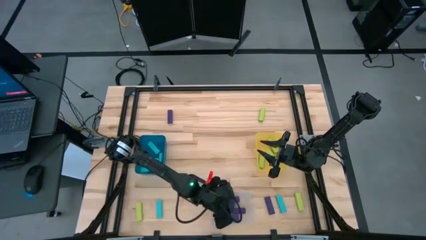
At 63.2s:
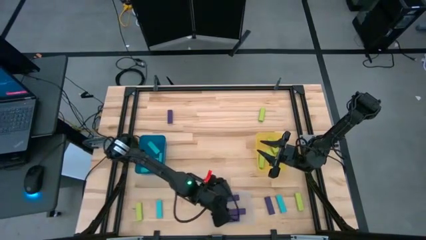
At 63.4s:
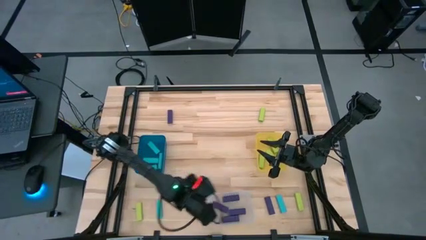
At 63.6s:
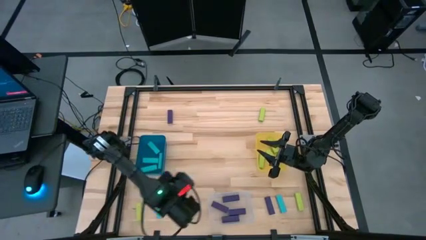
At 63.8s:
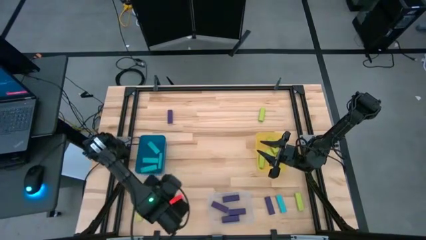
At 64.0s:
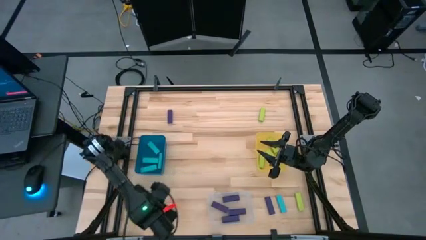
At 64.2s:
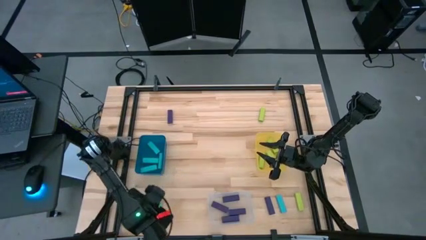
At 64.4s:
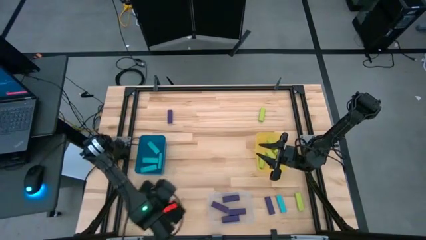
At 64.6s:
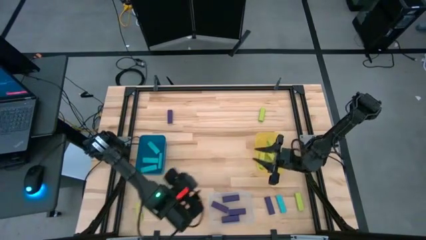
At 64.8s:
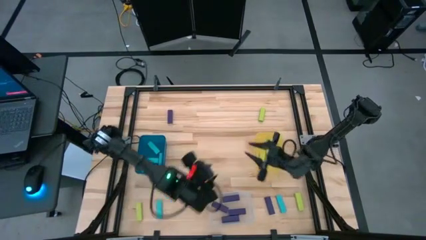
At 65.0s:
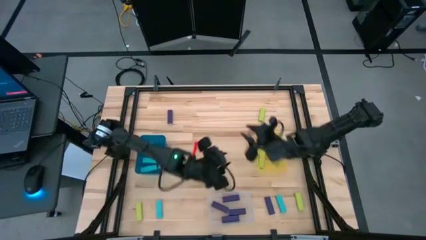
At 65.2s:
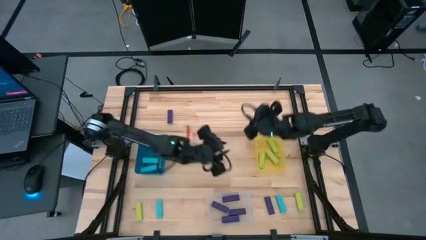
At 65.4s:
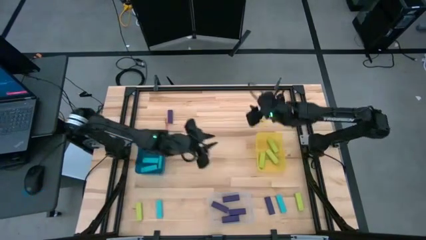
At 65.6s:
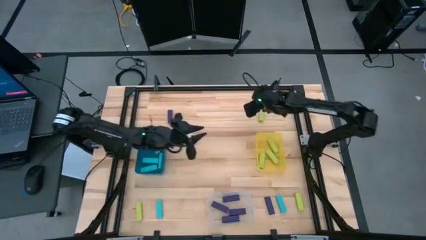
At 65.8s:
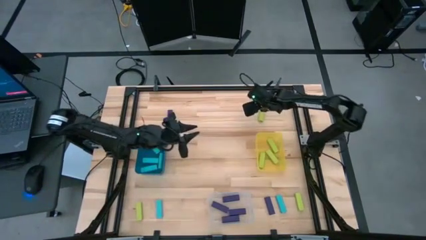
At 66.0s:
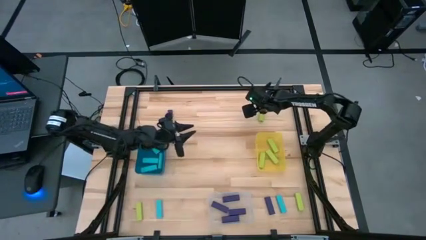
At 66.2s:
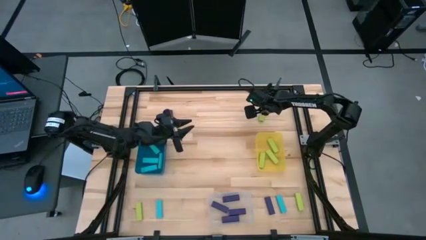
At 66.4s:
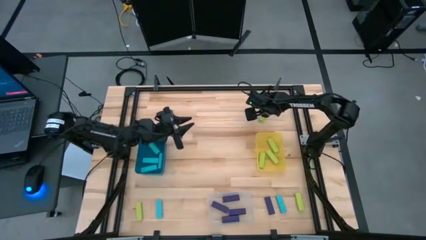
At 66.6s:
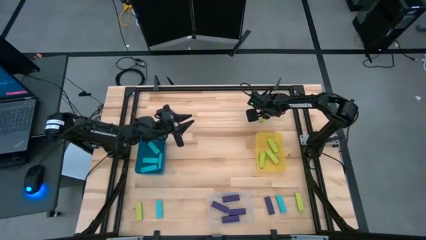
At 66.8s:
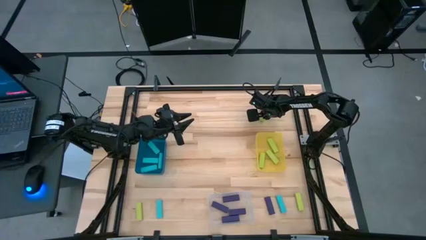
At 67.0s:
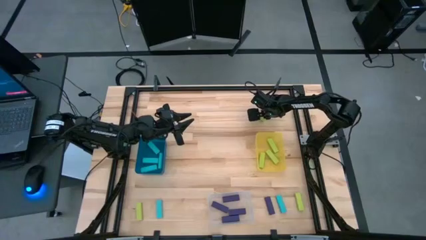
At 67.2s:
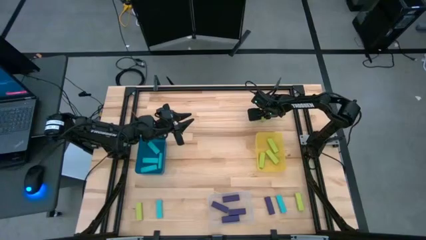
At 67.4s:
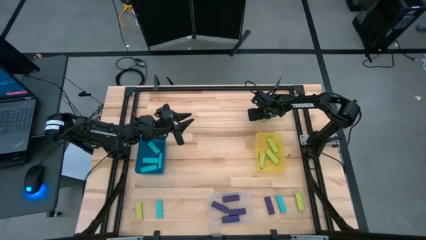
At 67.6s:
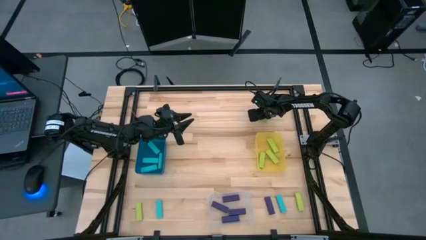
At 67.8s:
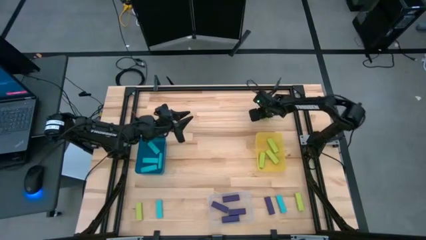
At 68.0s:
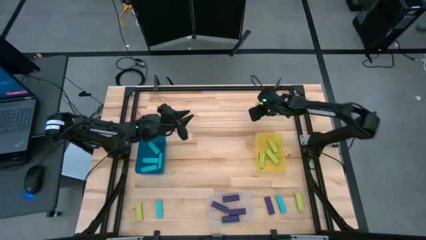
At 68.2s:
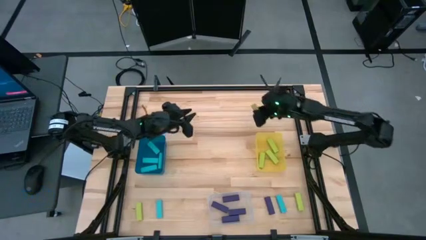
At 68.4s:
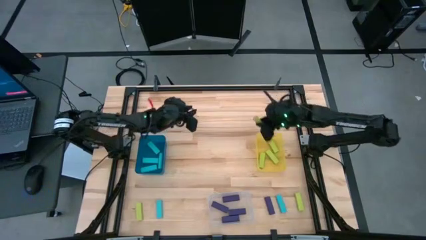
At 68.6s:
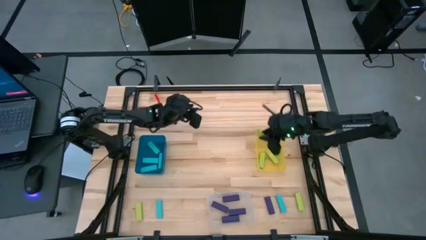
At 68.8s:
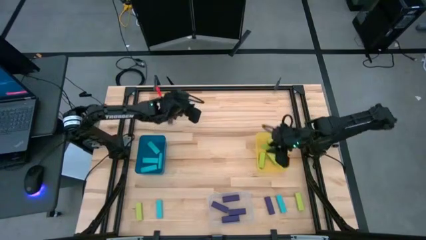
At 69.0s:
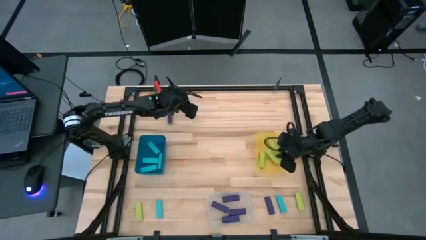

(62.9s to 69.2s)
Task: Sort blocks
Put the green block into the yellow bin

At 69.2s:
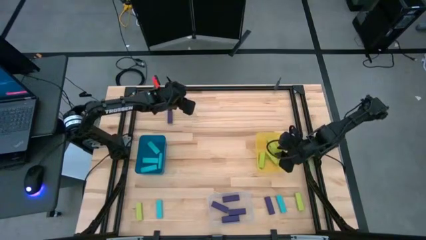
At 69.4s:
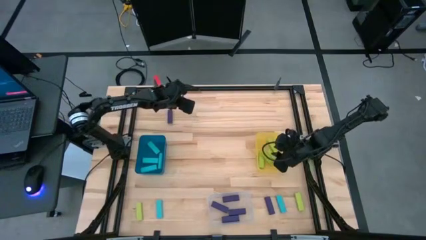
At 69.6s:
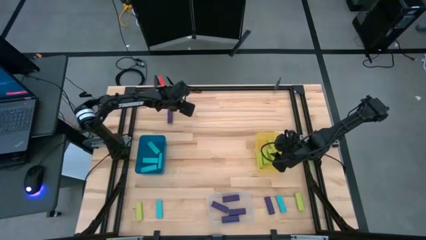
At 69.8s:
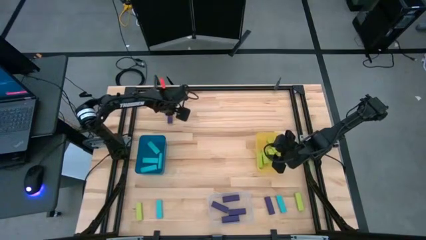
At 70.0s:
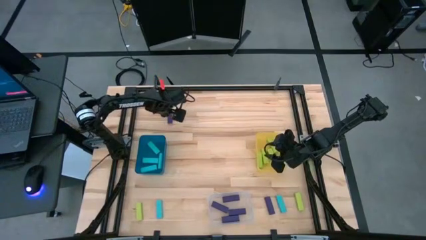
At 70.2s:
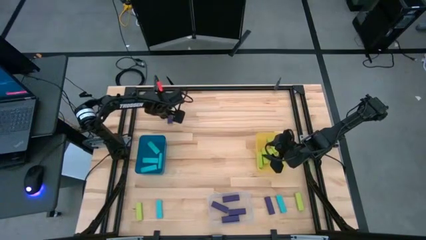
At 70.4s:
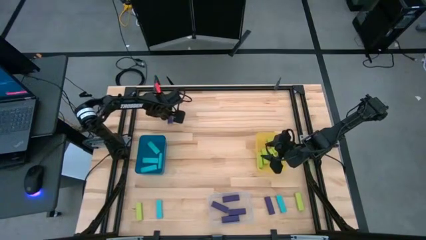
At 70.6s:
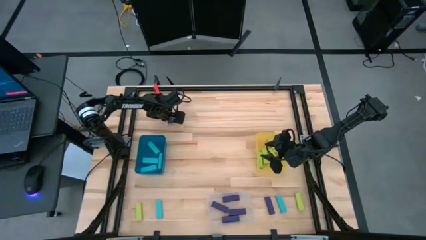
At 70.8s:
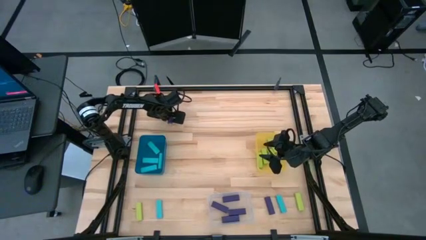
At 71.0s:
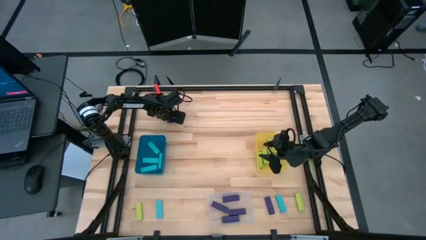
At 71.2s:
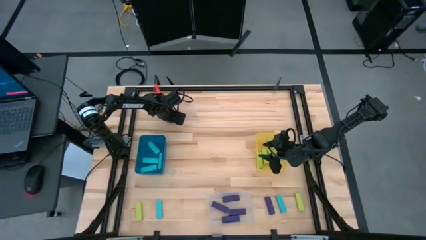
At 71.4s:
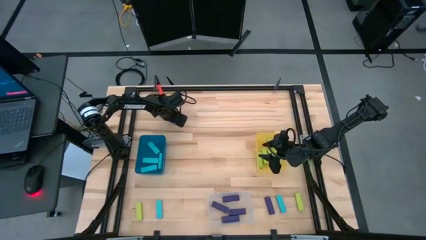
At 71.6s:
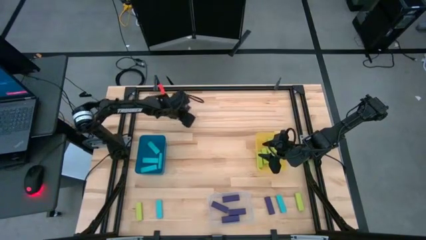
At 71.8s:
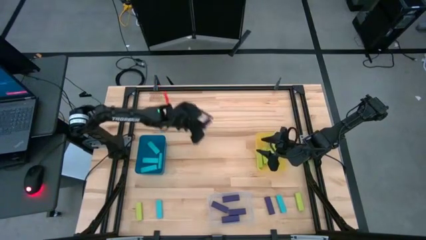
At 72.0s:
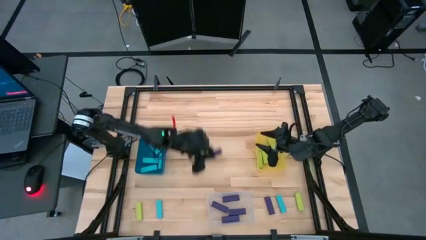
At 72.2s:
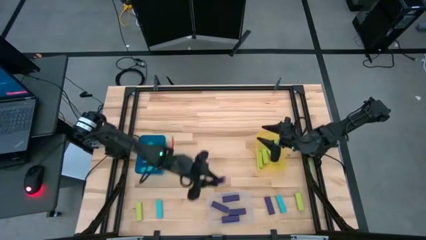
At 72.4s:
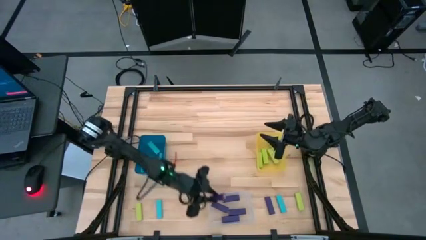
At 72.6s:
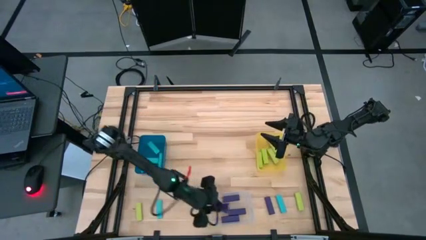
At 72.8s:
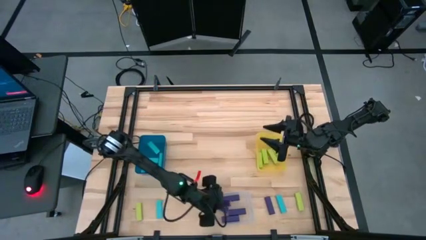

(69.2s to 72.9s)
Put the violet block into the transparent bin

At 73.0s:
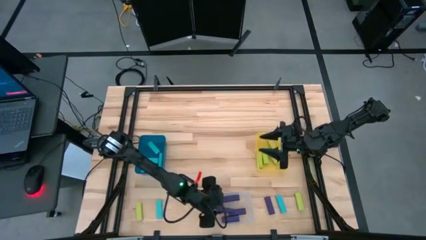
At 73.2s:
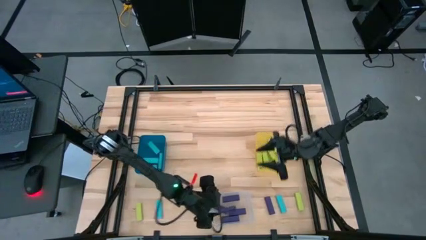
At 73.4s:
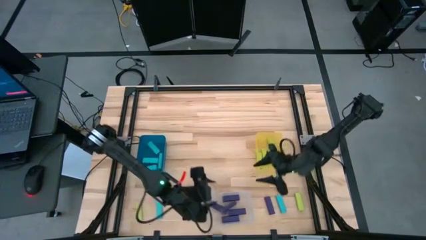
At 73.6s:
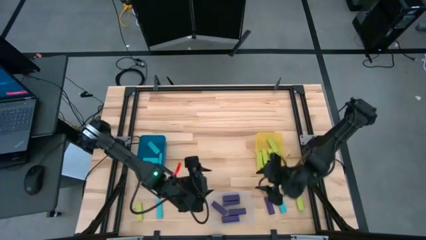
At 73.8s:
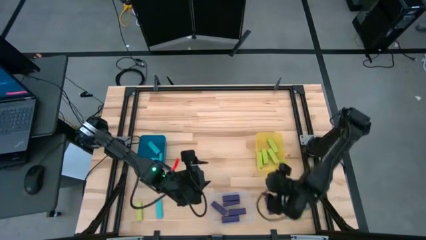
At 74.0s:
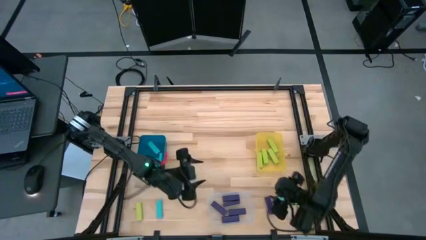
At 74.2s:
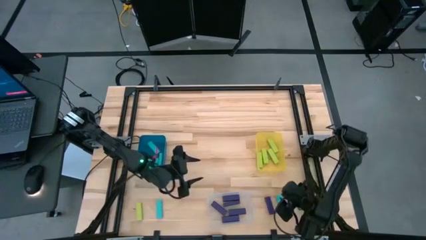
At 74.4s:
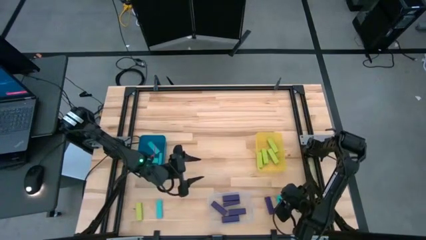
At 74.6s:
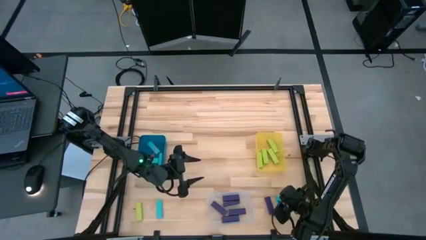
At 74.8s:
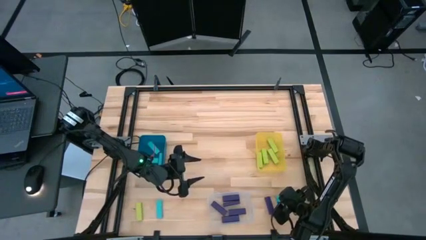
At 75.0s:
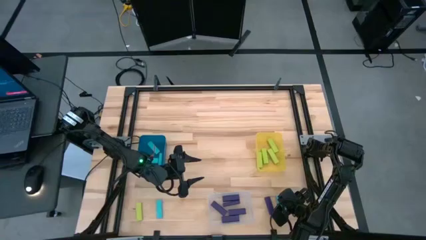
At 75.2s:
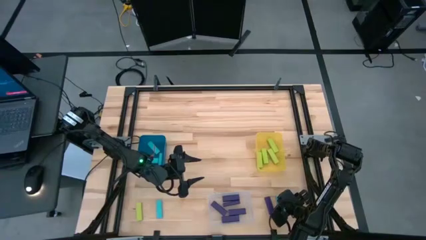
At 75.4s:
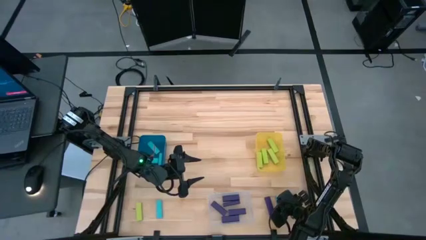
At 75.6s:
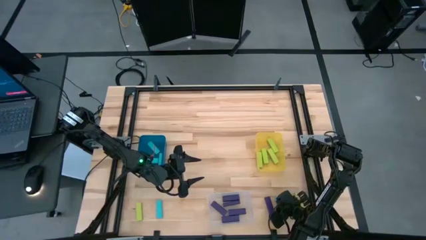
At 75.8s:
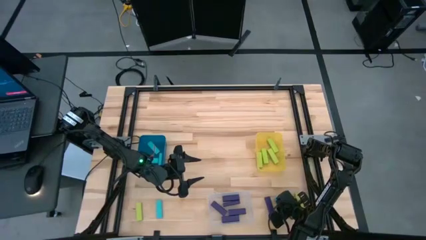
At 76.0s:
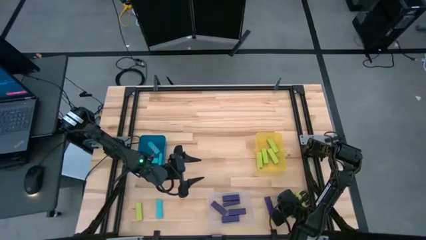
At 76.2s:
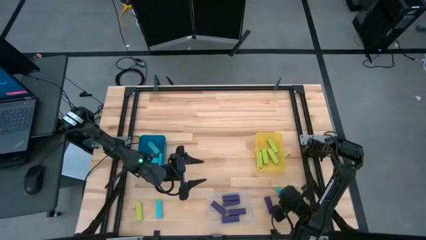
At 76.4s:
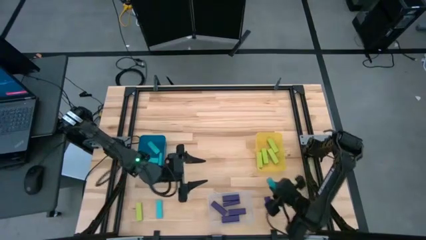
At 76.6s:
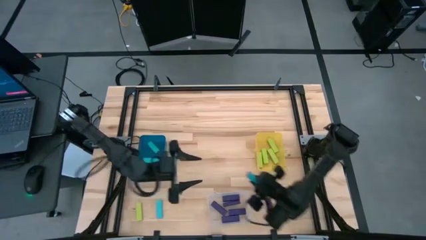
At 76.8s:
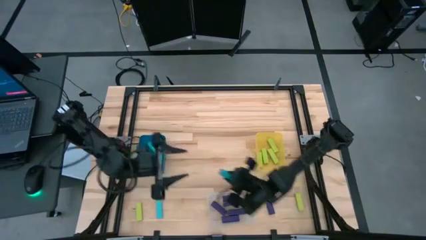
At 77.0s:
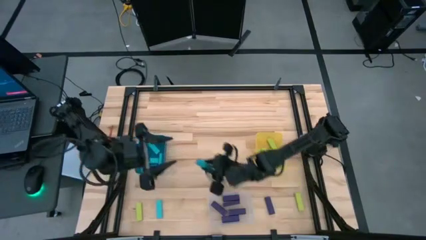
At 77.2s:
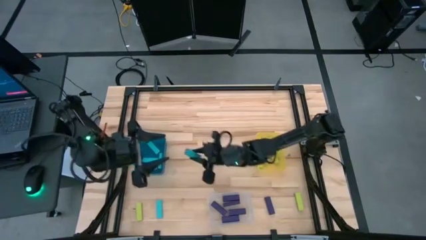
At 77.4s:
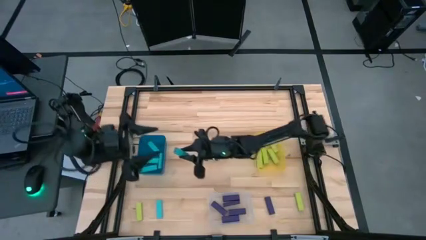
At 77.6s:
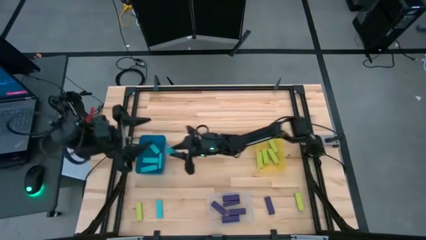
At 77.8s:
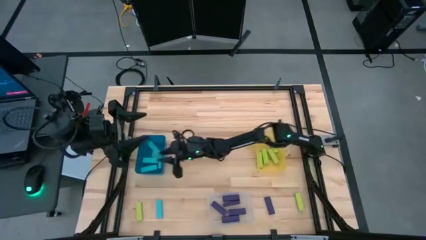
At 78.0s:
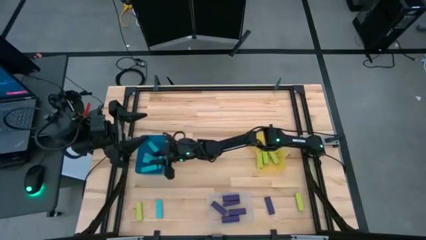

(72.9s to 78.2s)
Put the light blue block into the blue bin

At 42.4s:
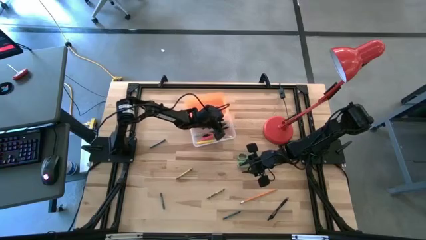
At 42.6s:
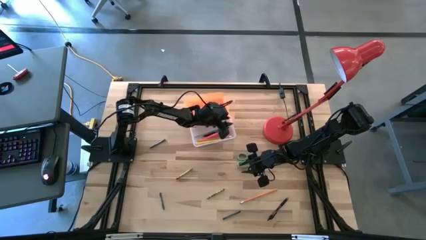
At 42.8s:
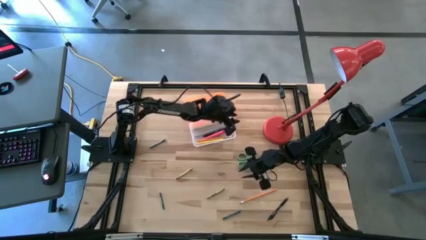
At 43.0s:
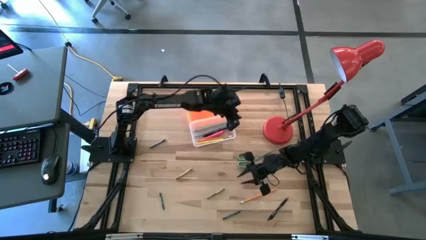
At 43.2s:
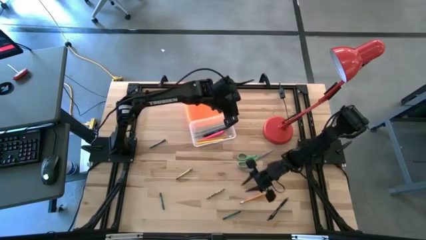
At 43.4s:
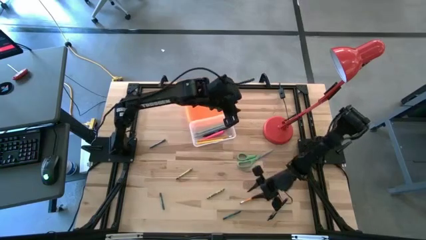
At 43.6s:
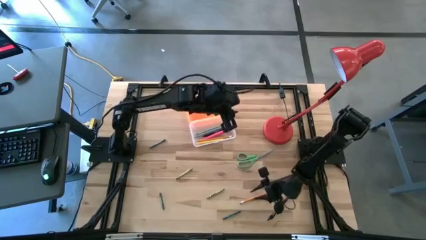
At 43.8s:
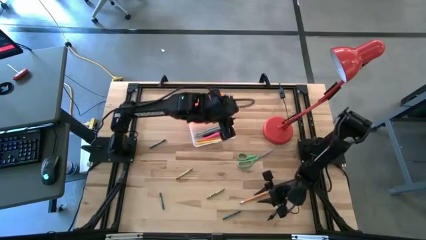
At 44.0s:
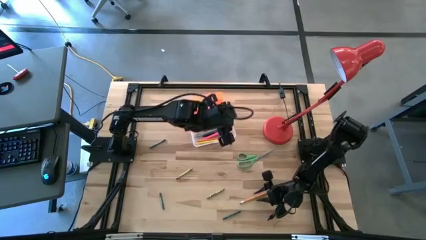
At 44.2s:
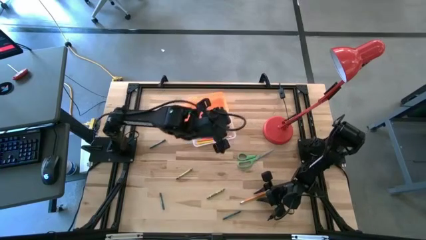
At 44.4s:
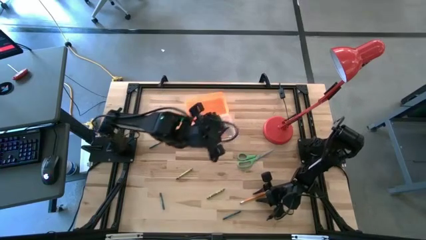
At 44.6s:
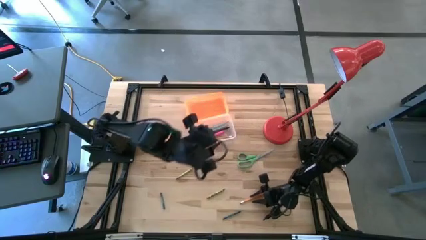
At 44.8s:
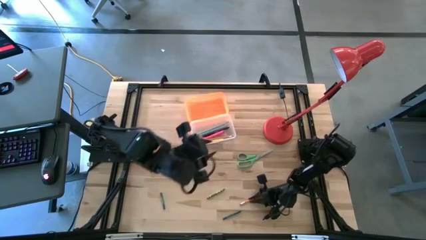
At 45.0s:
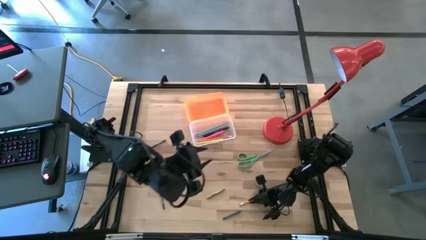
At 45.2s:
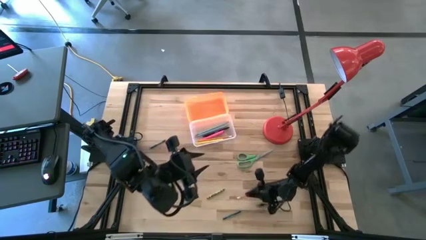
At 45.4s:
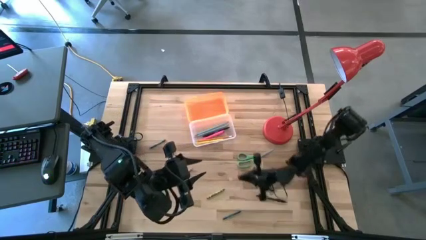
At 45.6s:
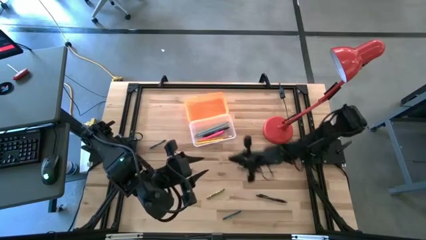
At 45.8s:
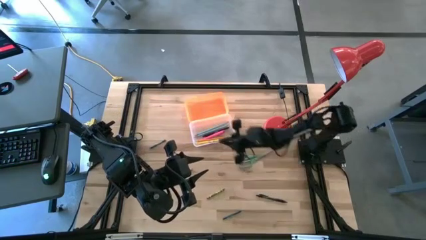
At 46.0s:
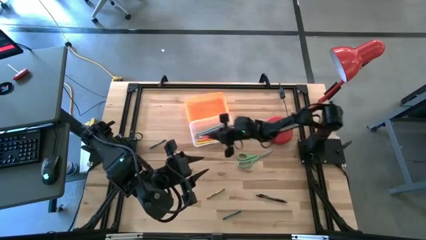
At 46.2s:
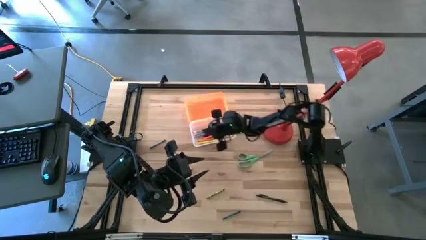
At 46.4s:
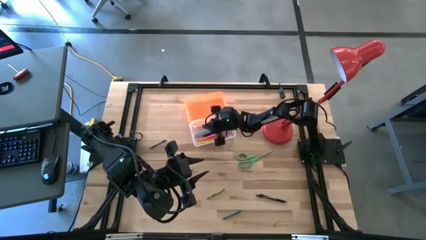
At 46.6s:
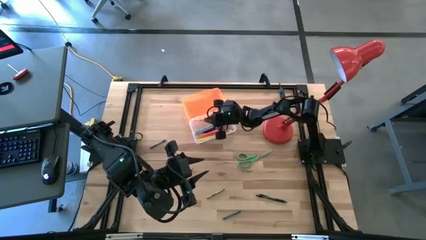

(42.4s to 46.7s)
Task: Pick & place school supplies into a supply box
Put the orange pencil into the orange supply box
